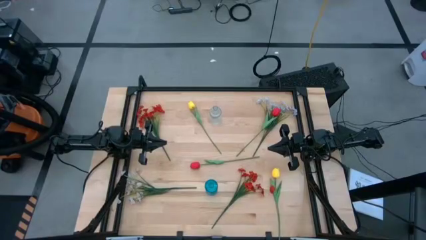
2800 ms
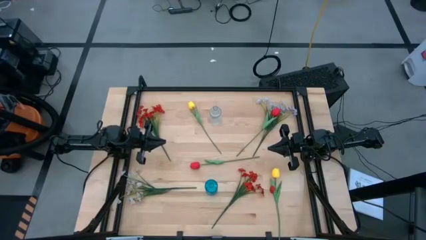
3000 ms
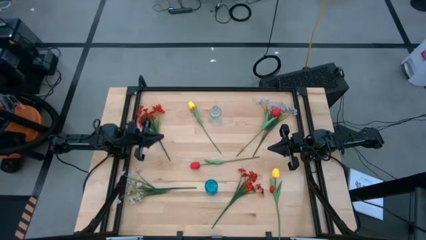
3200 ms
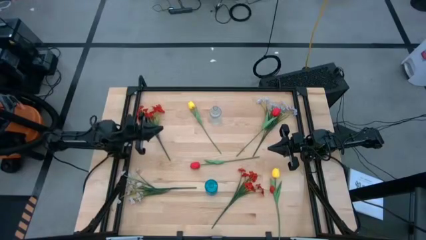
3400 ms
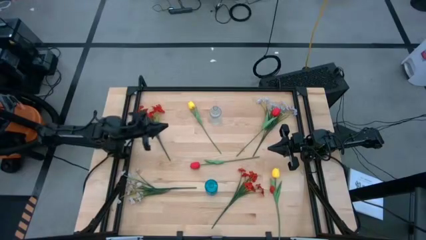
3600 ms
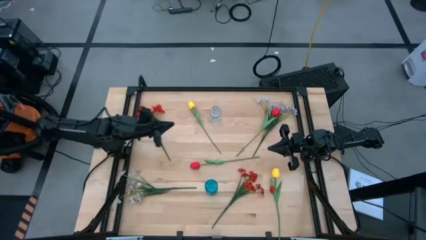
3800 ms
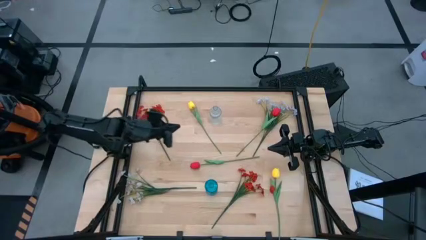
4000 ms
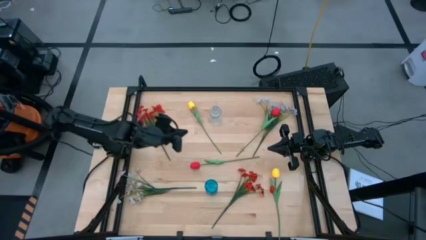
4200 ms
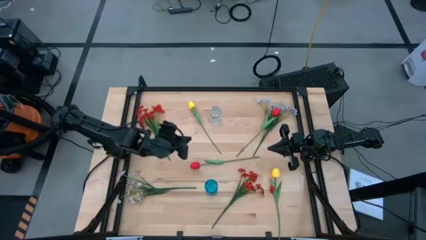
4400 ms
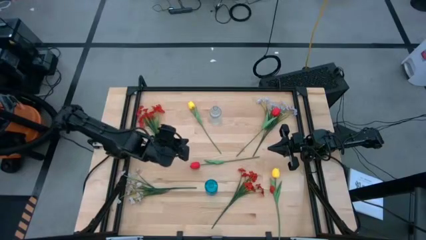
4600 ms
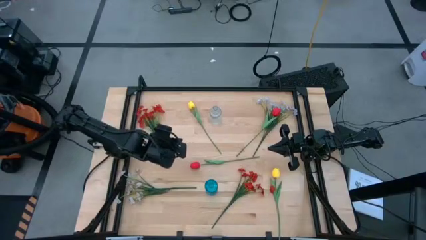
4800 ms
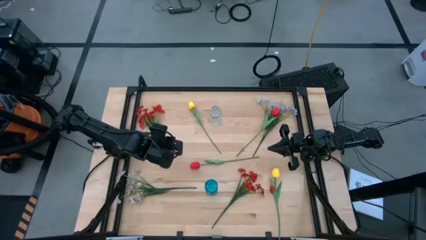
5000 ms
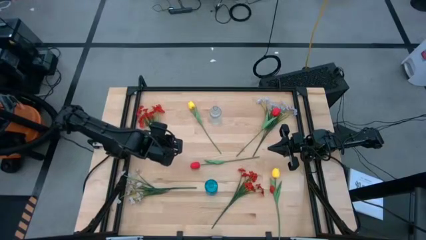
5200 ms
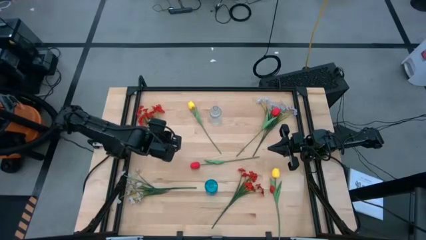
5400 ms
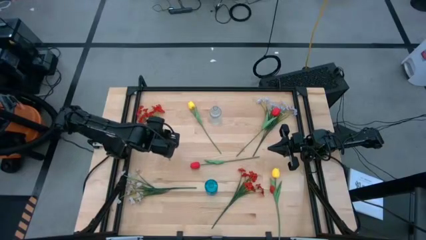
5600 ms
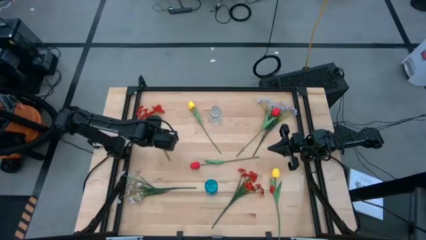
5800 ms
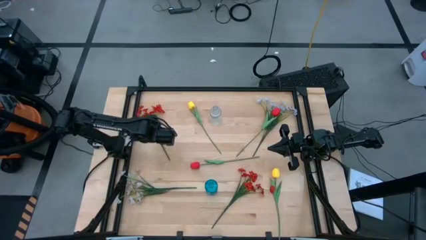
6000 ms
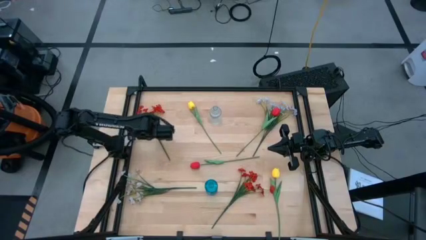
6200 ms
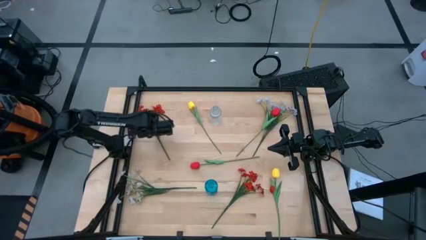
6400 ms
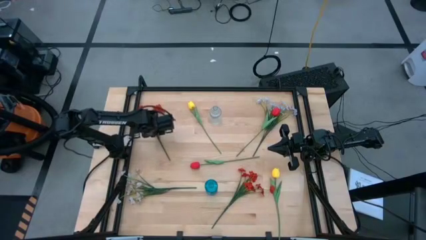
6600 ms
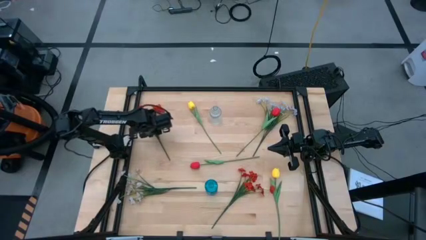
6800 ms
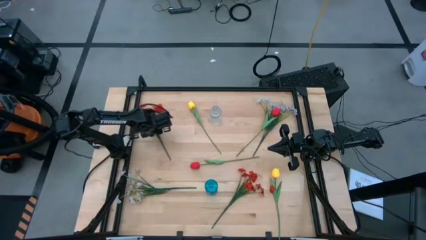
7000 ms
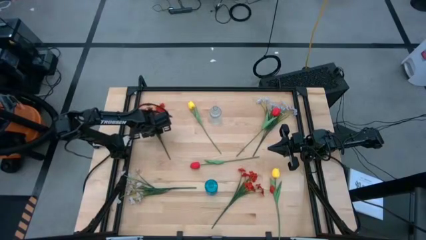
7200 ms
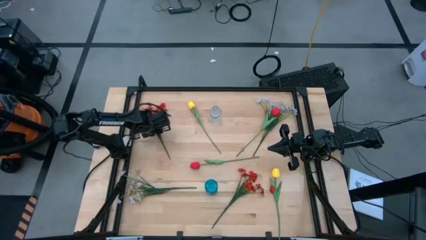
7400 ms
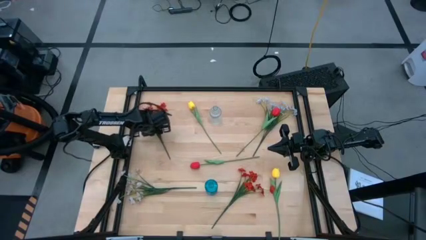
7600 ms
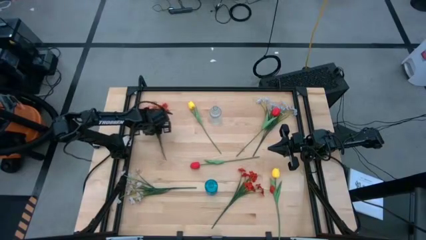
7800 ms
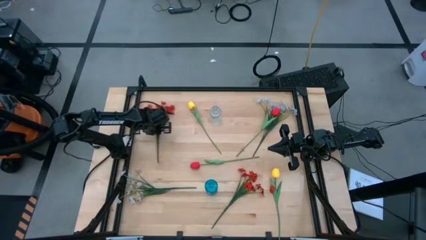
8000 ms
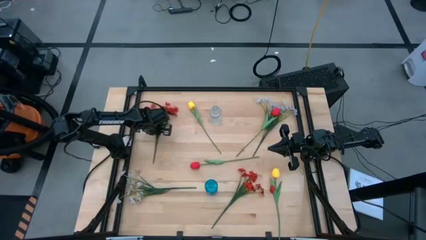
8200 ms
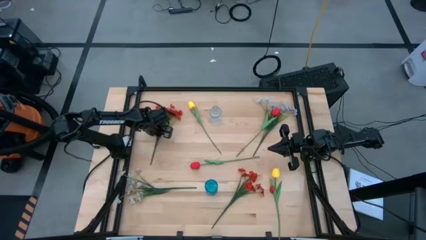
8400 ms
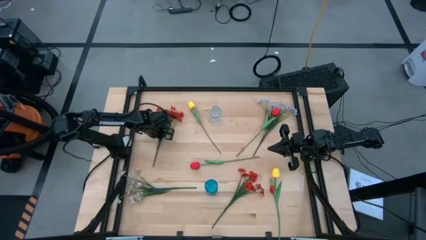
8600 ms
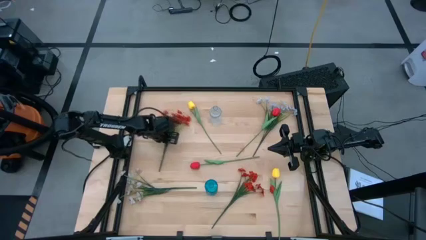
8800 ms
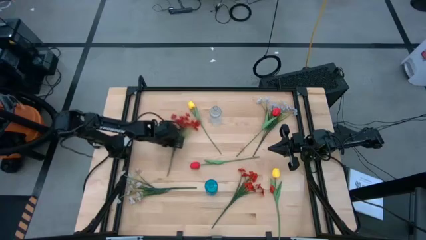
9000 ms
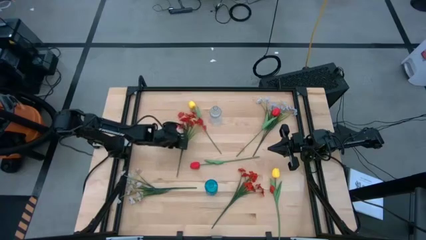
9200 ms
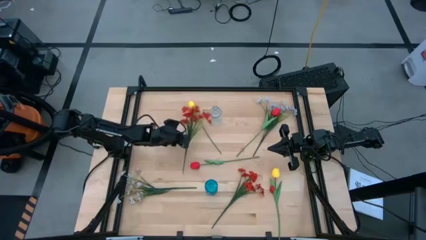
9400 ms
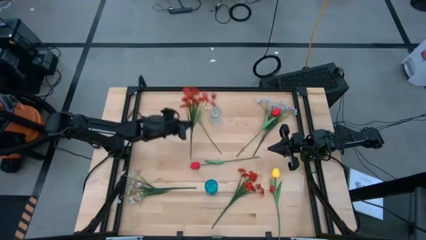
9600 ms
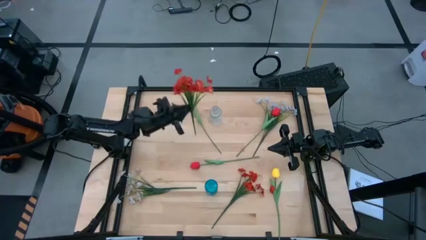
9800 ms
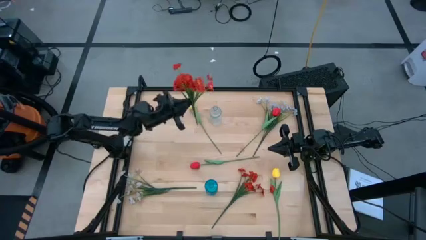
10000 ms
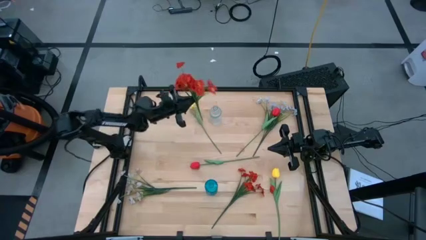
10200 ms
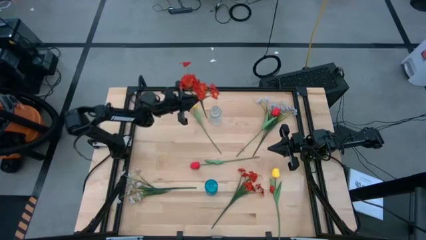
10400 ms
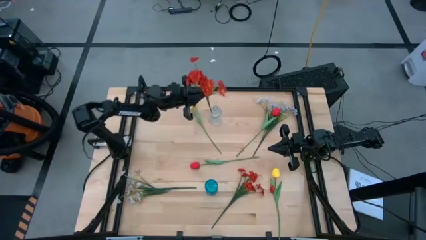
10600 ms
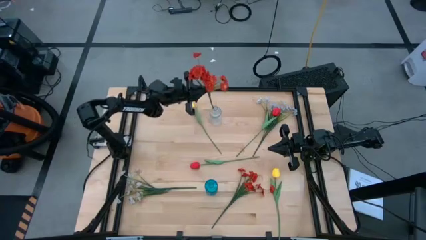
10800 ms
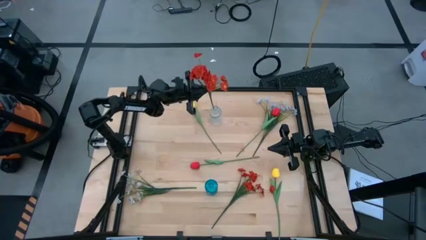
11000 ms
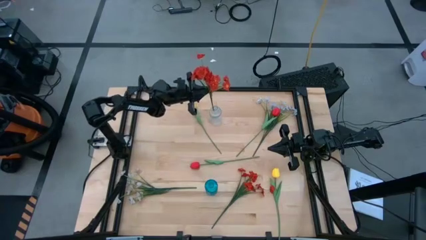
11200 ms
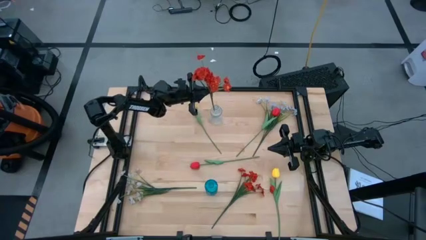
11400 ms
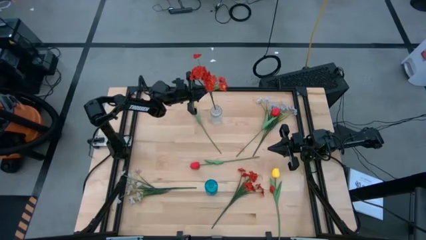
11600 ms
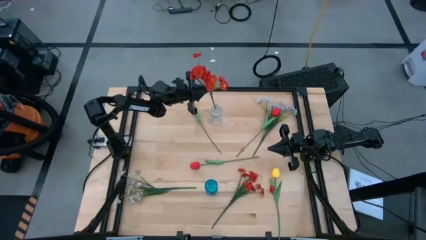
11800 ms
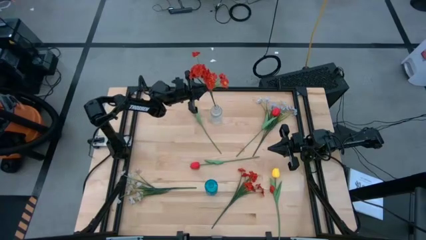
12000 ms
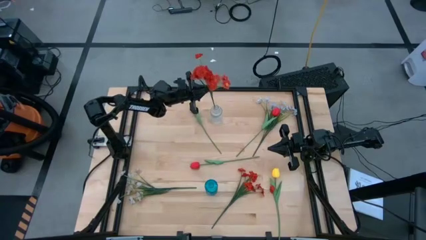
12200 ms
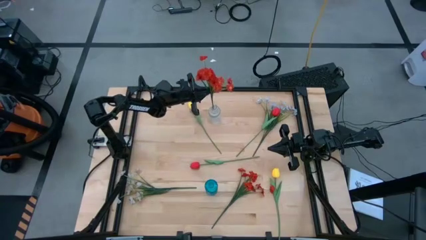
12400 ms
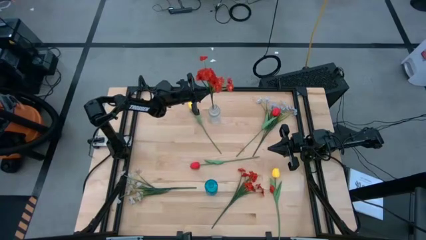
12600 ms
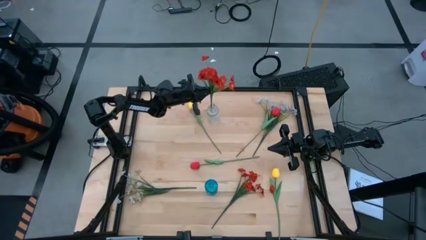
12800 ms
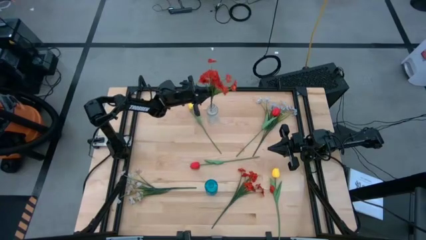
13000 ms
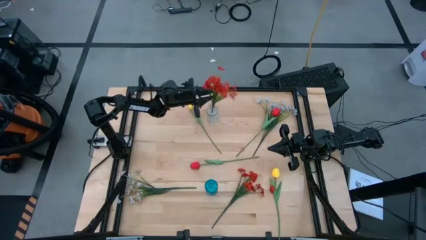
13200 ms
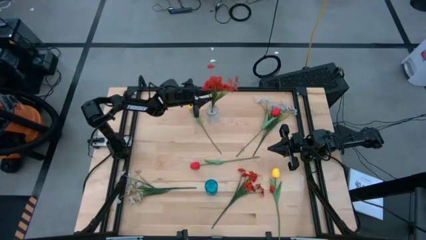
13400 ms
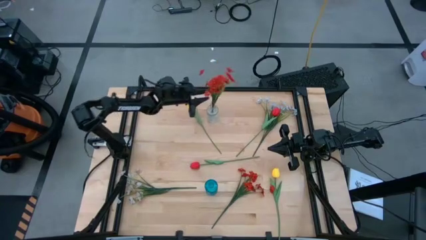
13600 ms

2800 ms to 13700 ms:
Task: Sort flowers into vase by color
Put the top orange flowers into the transparent vase

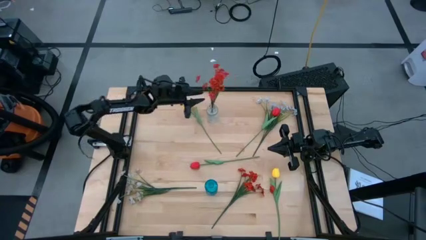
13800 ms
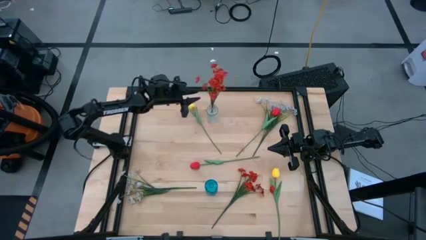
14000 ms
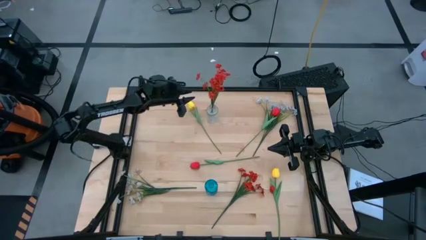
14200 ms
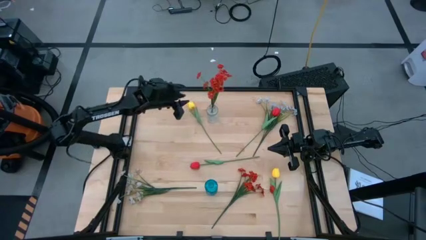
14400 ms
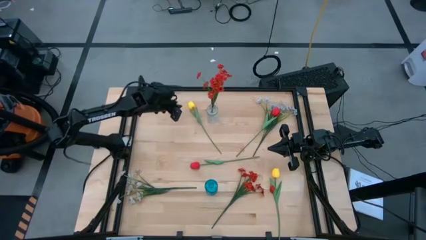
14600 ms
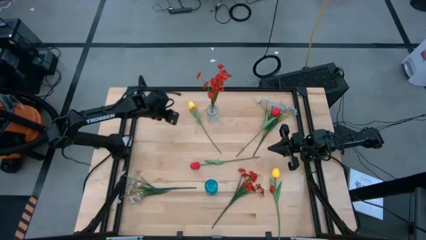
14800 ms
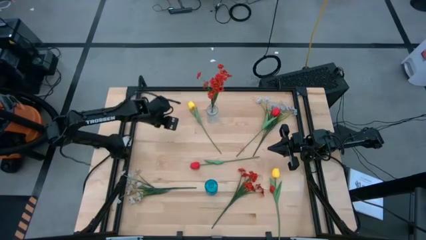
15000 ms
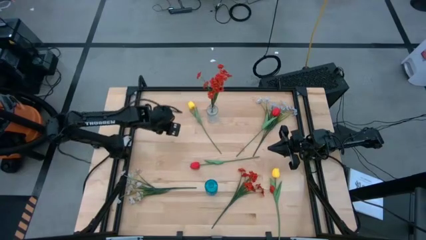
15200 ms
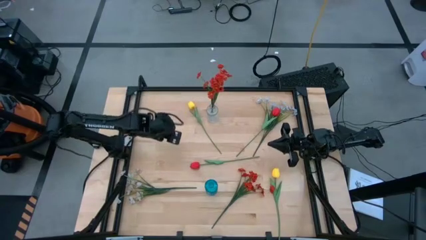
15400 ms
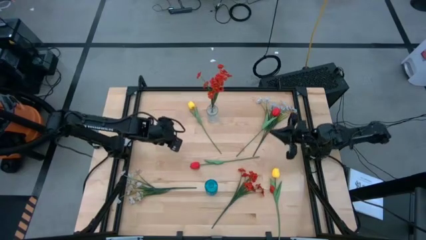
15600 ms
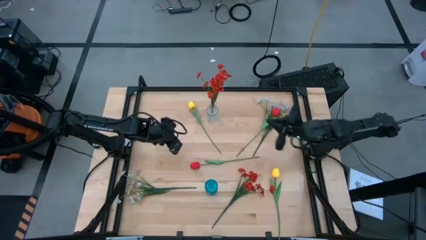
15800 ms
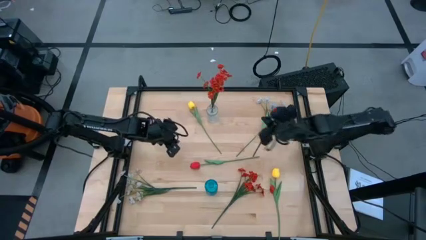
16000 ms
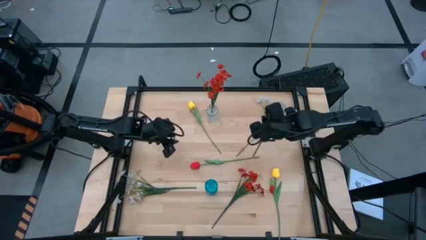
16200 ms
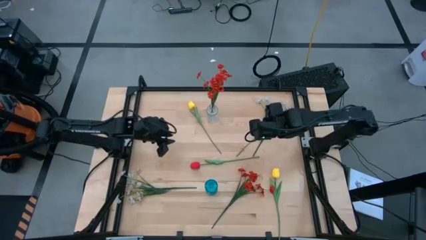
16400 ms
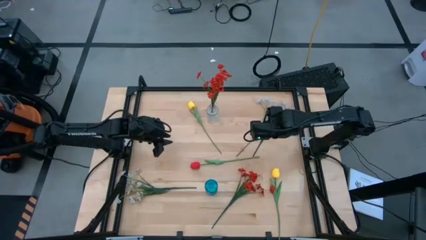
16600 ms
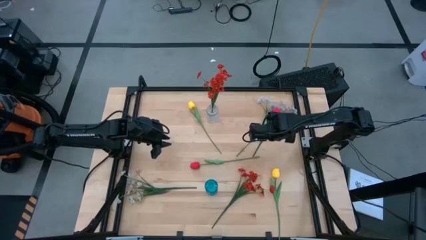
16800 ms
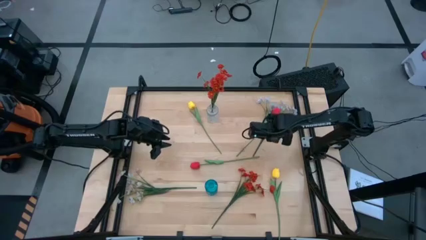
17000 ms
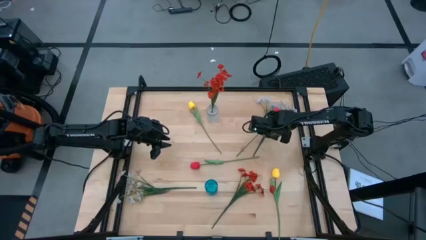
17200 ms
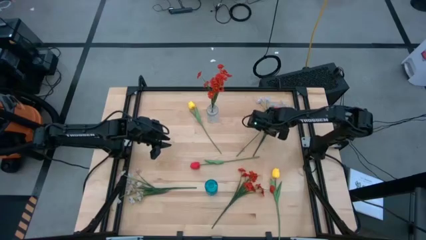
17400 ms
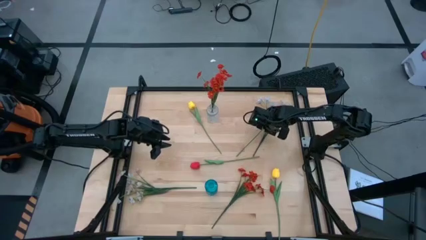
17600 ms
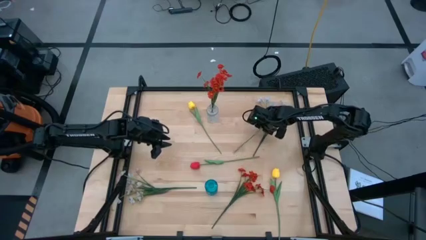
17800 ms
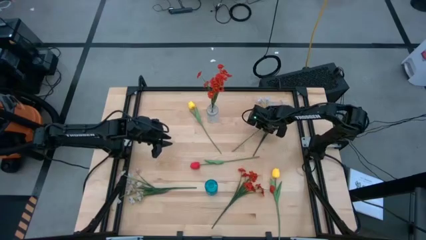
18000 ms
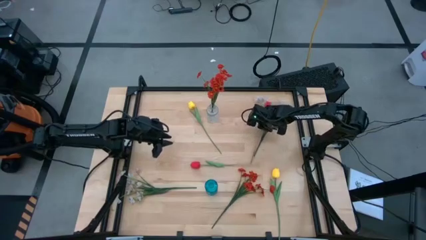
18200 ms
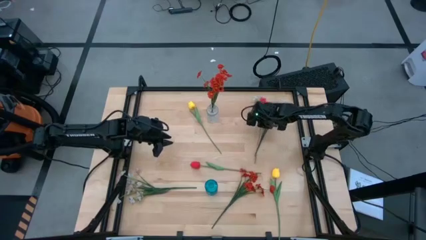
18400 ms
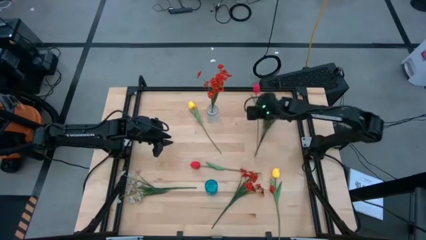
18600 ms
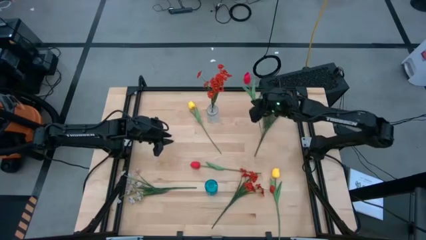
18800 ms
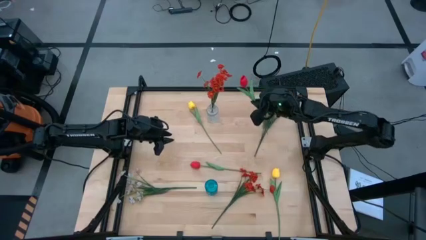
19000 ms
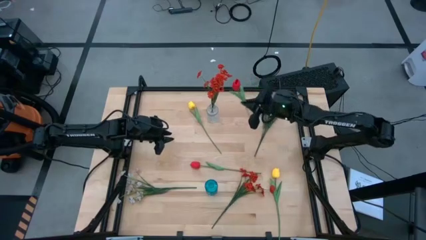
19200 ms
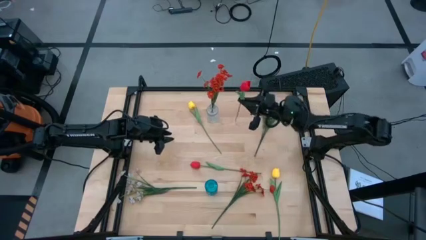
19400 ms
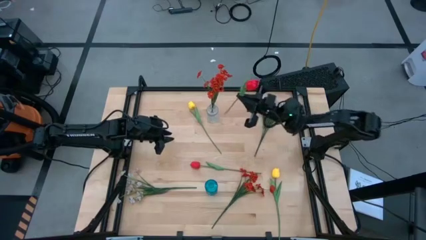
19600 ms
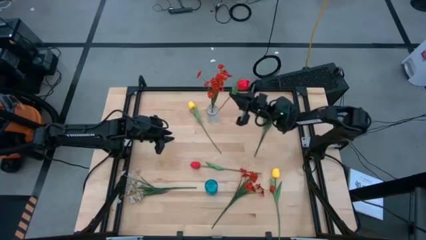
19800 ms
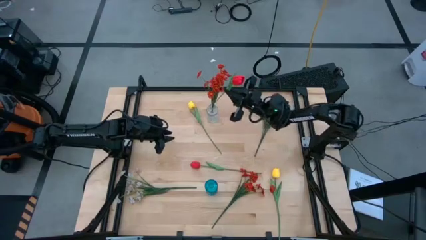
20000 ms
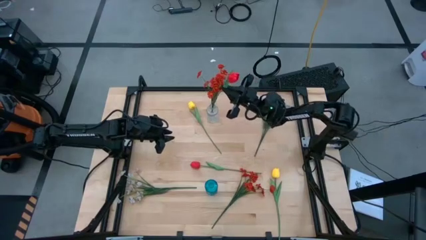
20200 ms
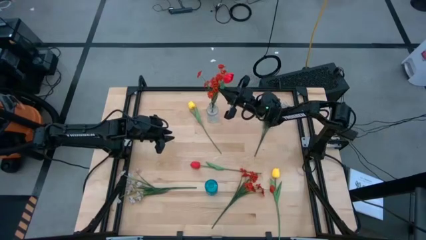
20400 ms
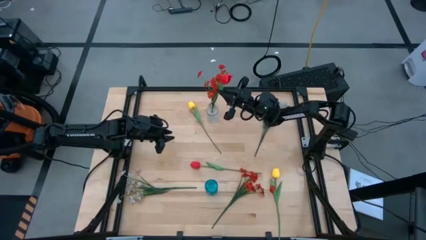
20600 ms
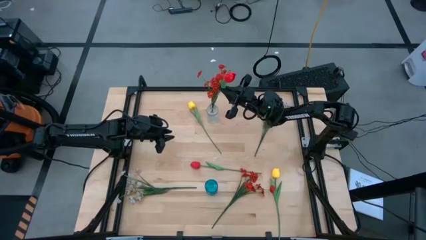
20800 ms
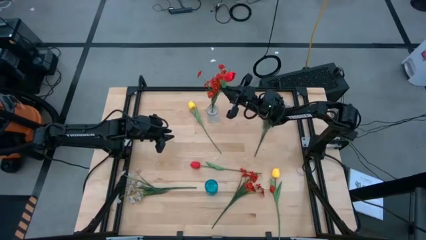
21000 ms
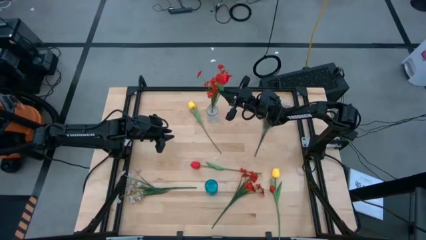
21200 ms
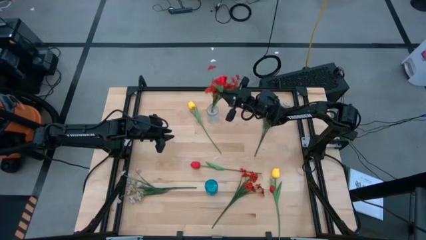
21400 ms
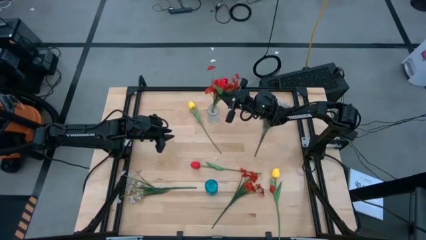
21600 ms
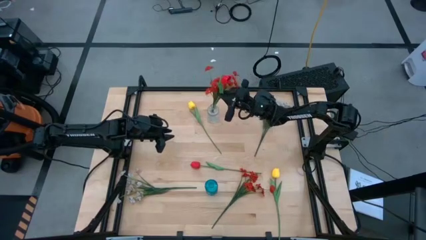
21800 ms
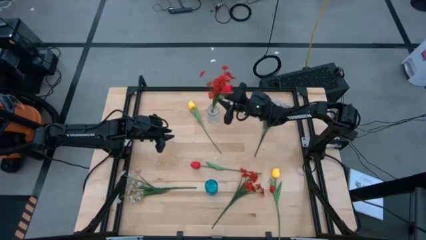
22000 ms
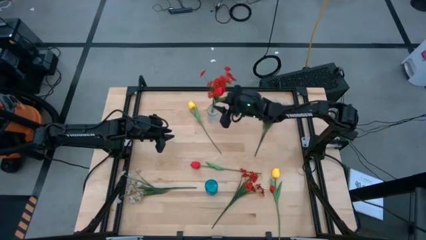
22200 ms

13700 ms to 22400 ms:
Put the top red flower into the transparent vase
